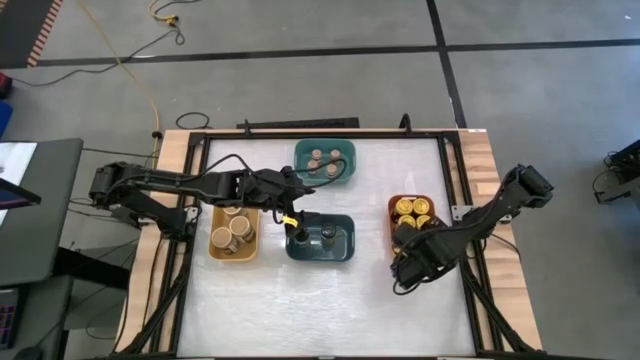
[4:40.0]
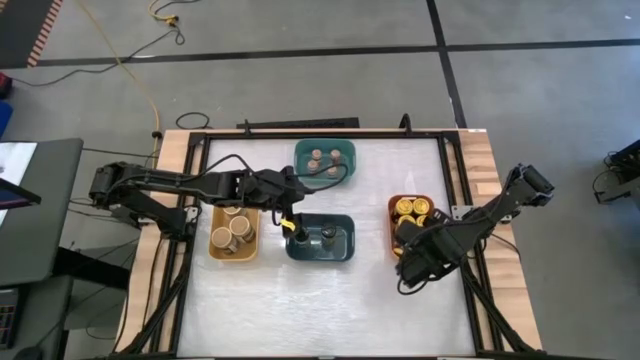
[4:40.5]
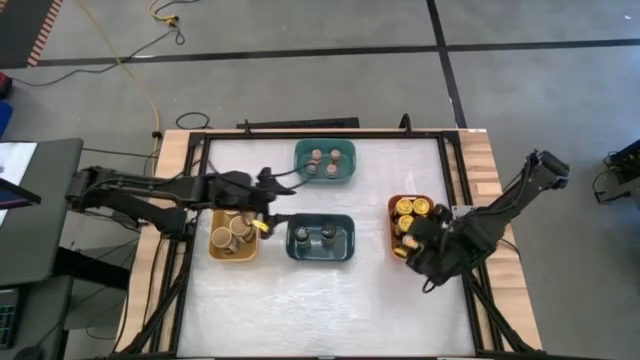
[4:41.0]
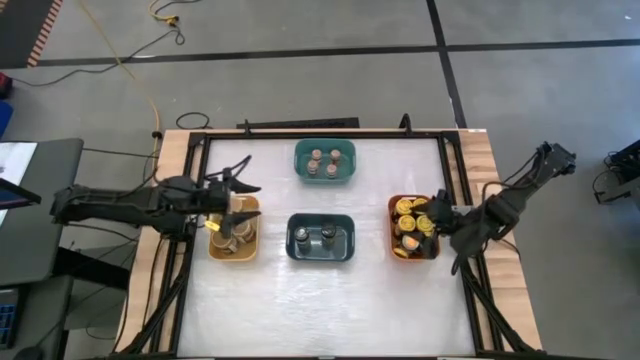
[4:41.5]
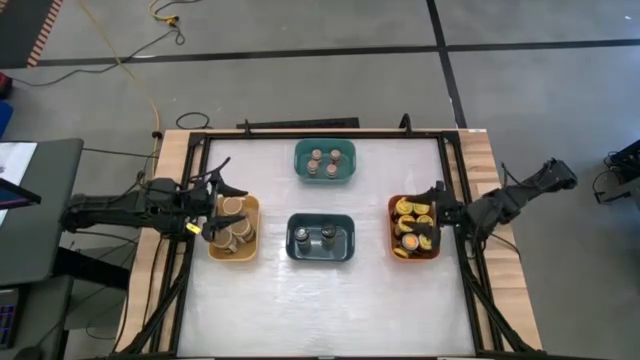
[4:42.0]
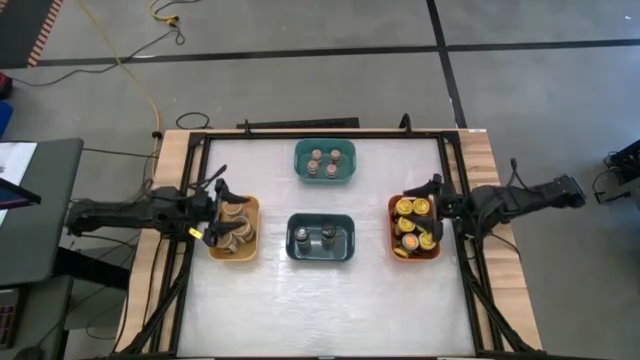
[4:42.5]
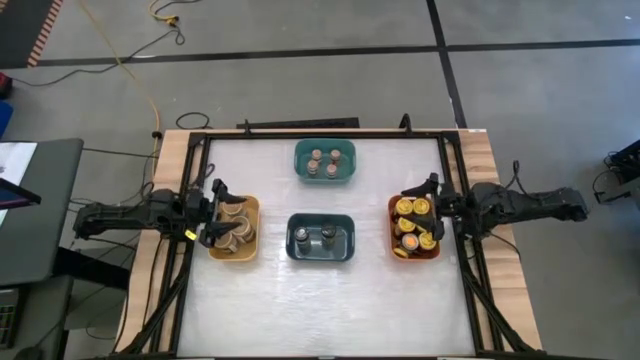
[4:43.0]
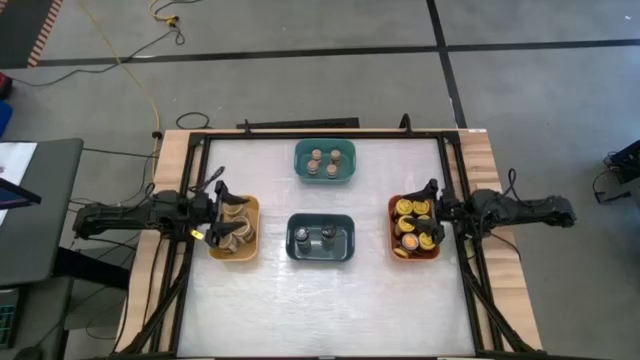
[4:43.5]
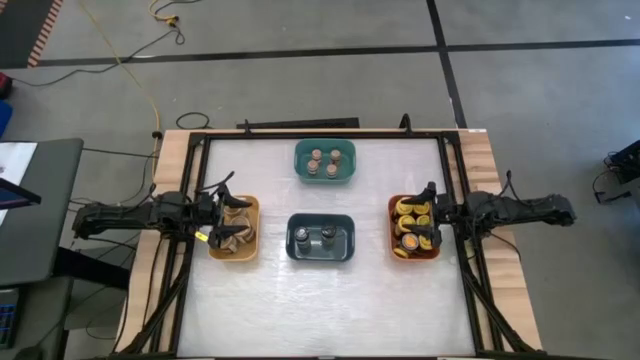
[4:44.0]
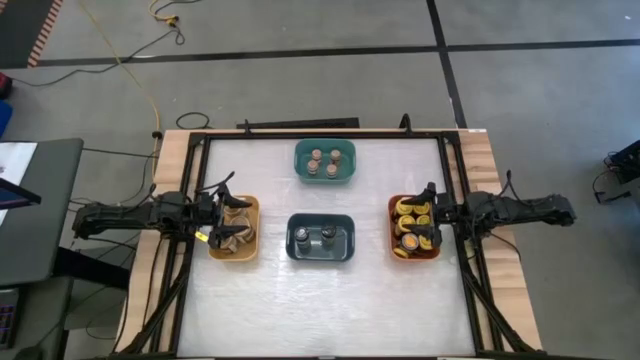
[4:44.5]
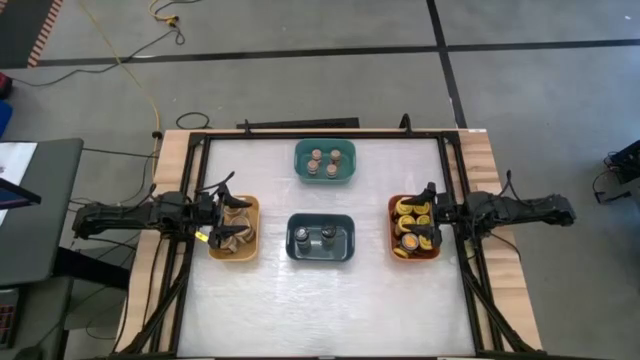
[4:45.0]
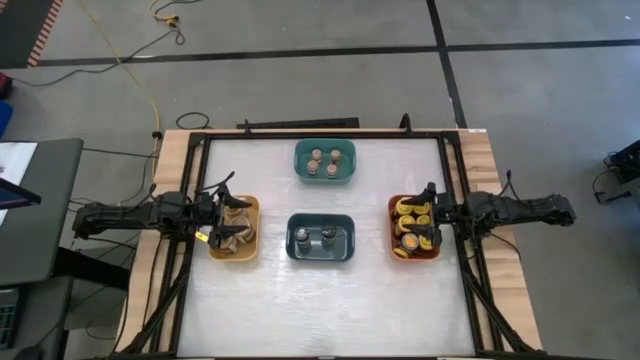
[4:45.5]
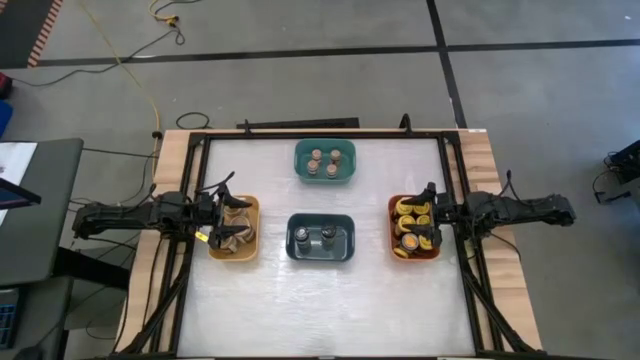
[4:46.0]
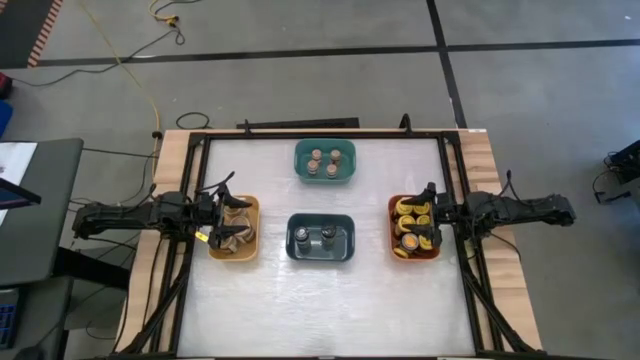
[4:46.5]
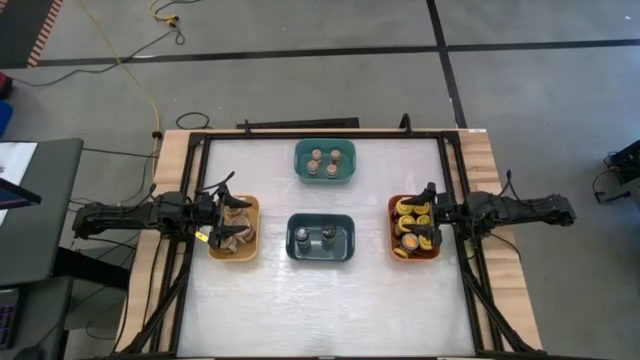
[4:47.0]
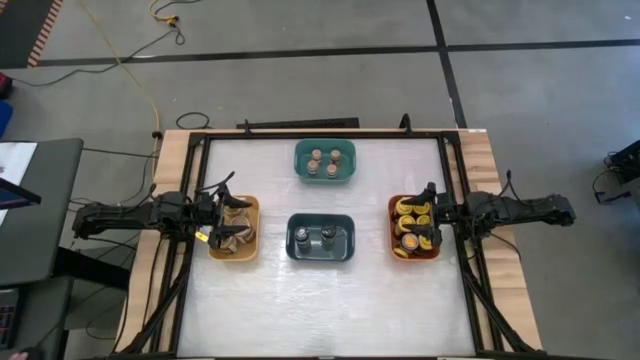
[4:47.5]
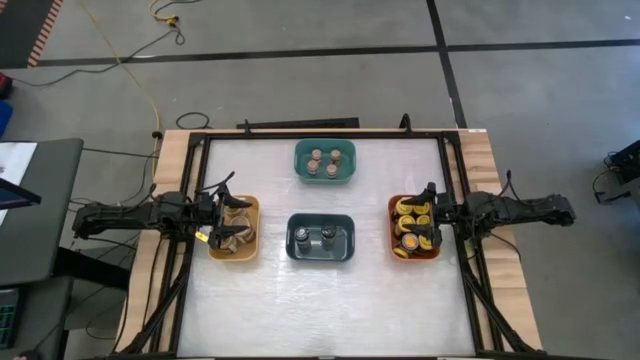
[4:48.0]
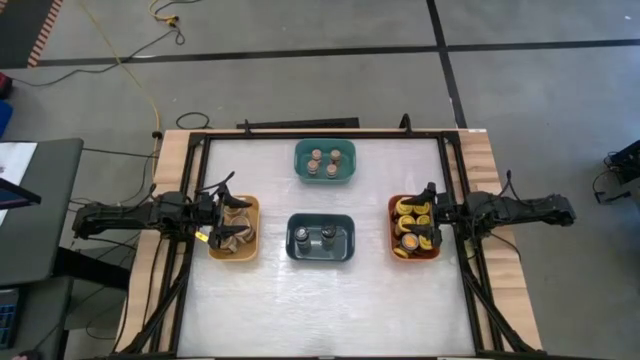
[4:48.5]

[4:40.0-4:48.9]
Task: Sort spices by type
Return to Home Position

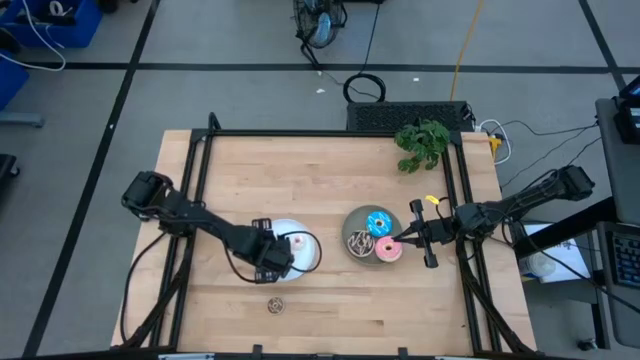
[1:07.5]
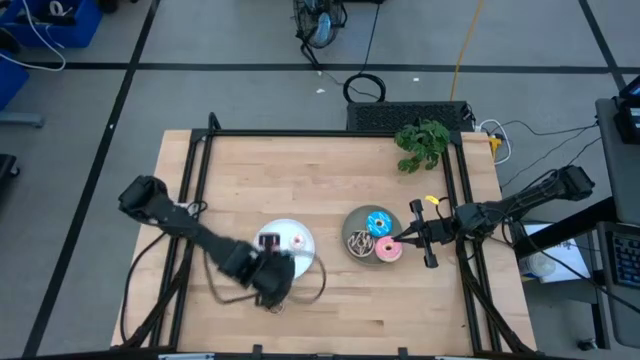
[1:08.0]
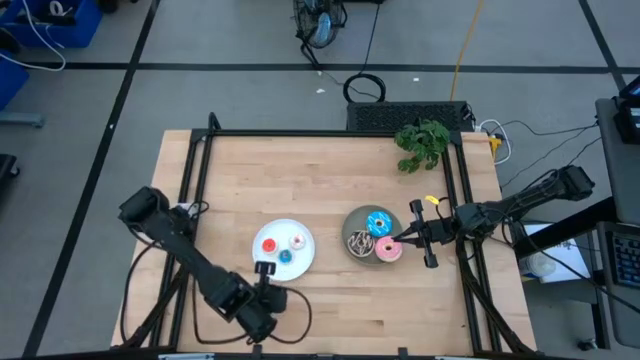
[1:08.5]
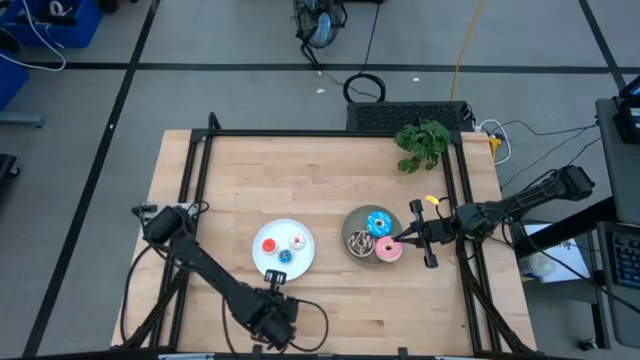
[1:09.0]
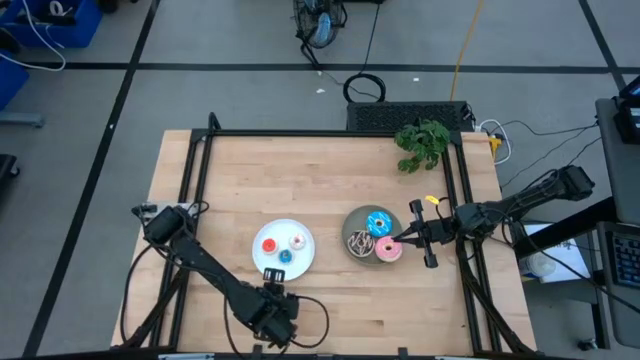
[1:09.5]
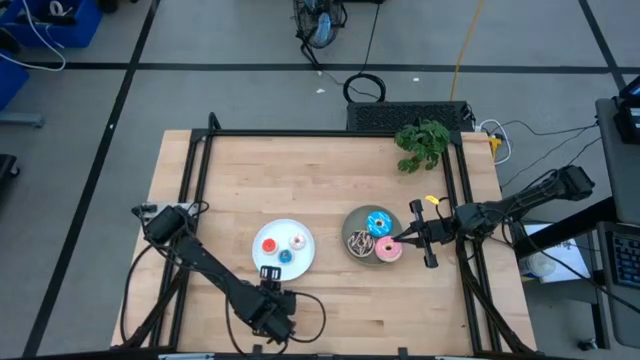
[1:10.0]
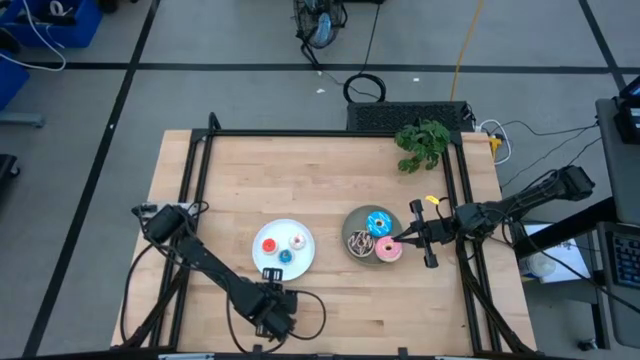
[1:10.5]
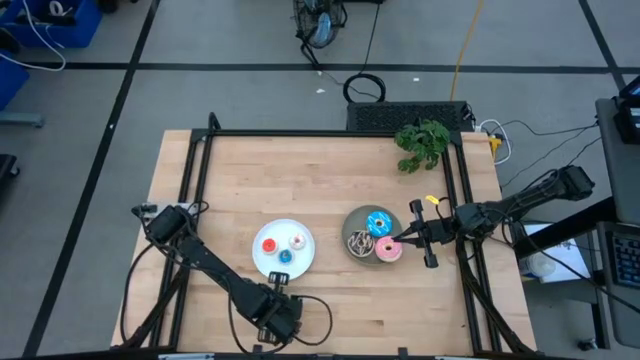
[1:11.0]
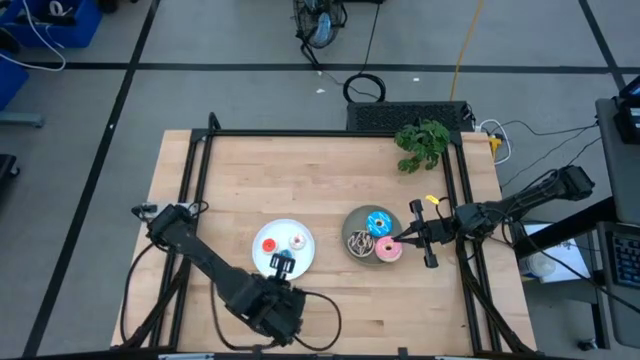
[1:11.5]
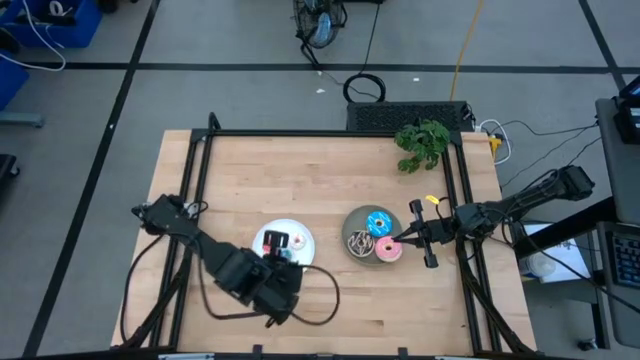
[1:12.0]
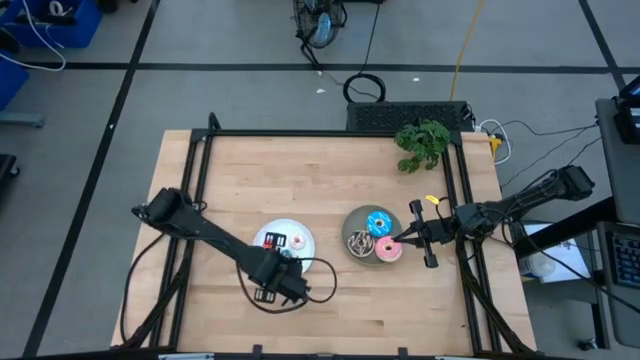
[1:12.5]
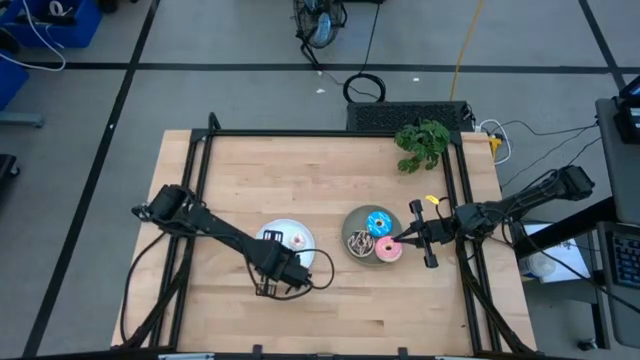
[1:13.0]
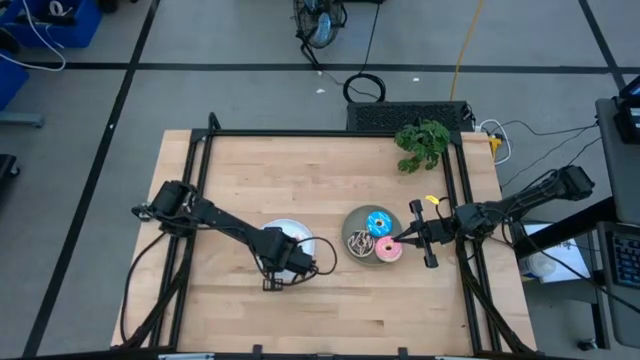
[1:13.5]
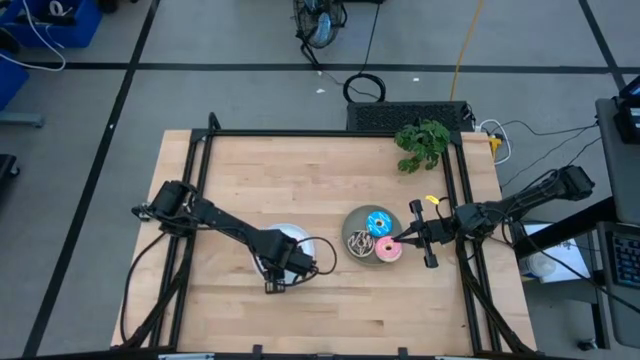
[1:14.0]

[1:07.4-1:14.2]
Task: Pick & Place donuts
Put the small brown donut on the white plate

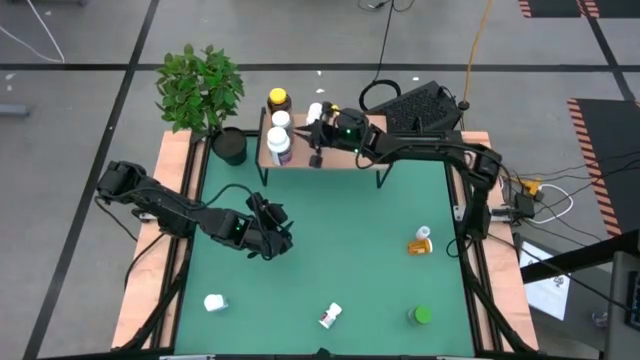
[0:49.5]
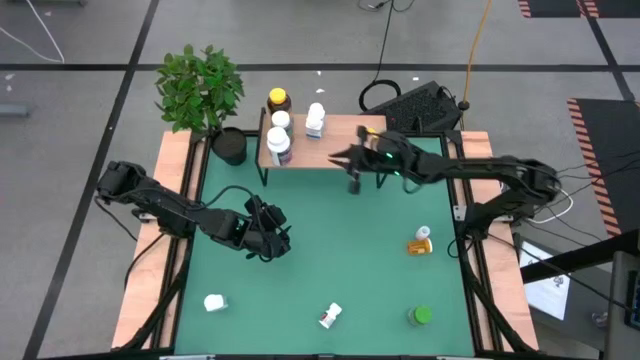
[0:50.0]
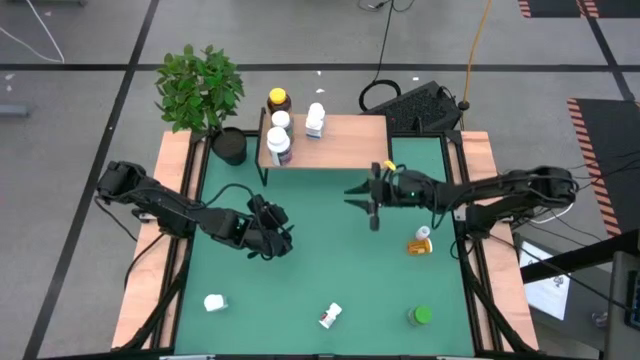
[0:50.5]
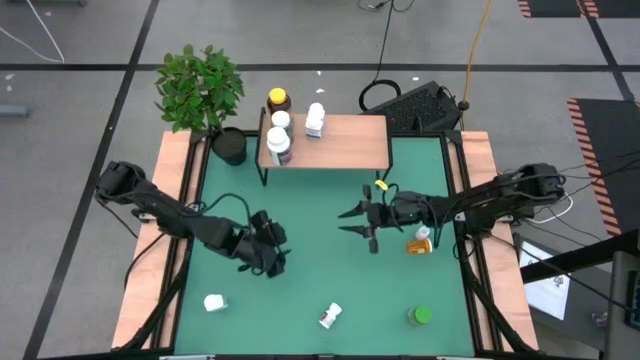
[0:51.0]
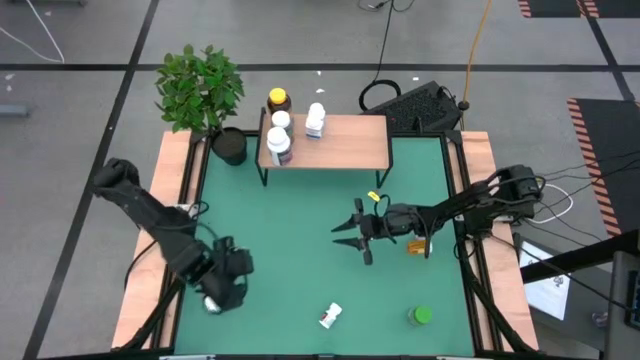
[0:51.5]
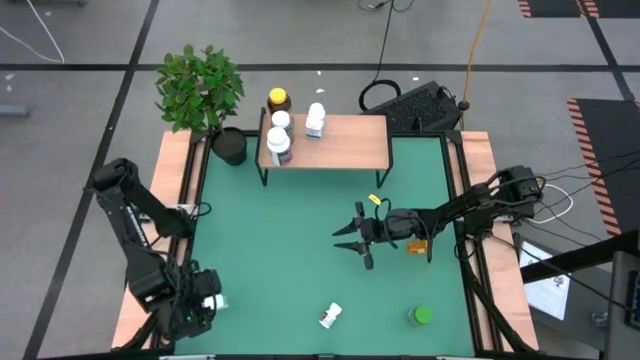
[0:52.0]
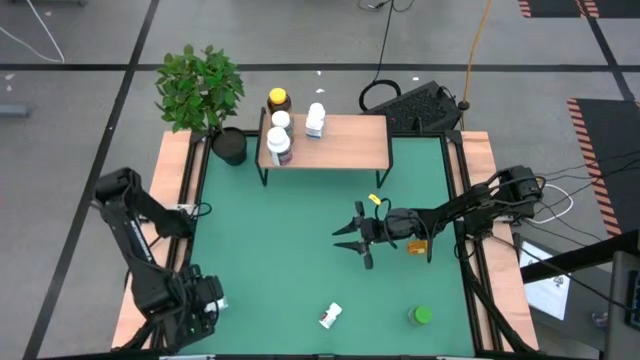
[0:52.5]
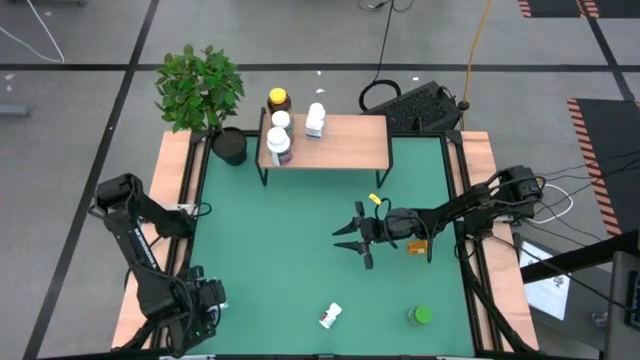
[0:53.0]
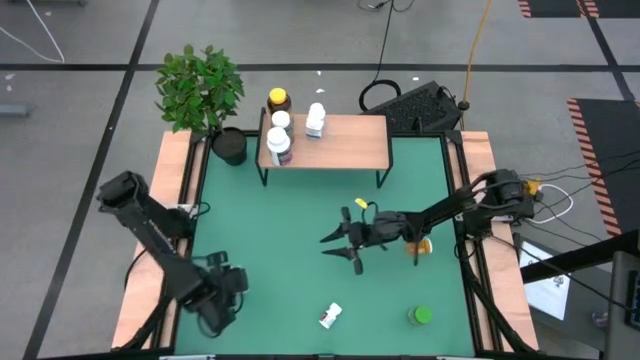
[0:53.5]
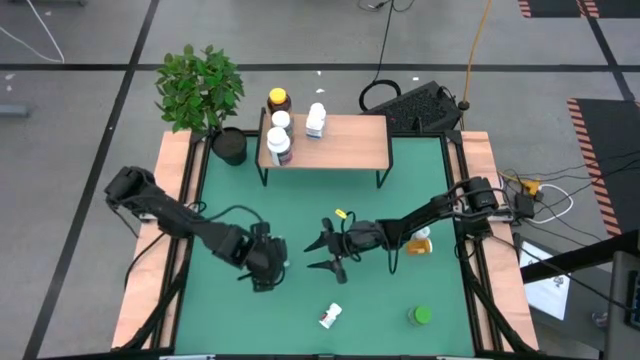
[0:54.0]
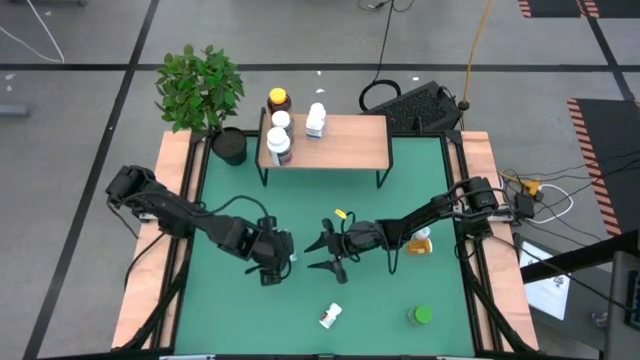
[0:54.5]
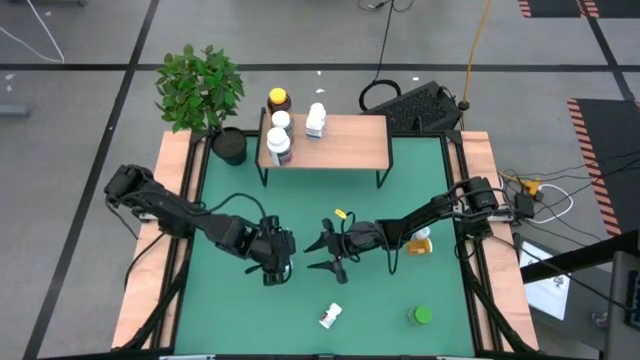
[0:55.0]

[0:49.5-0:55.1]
Task: Pick and place medicine bottles onto shelf by color
Move the white and blue medicine bottle
